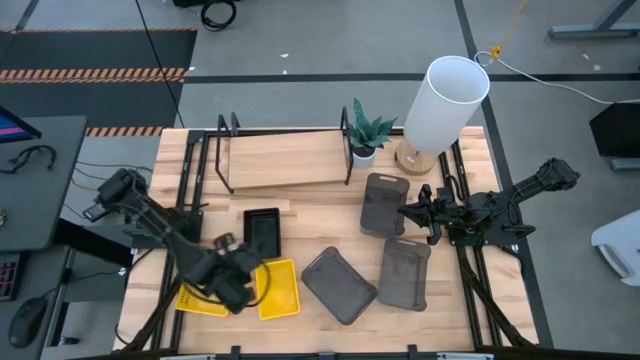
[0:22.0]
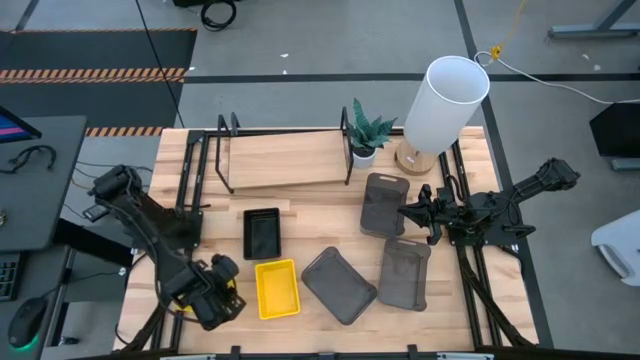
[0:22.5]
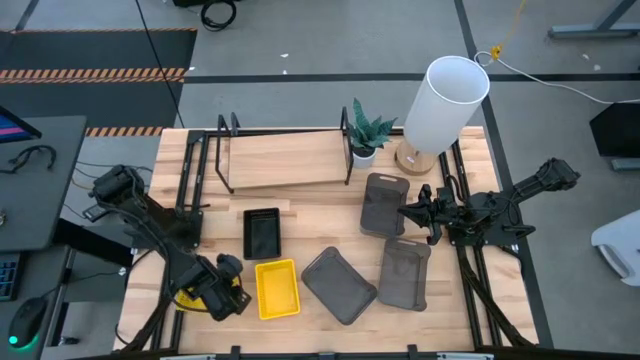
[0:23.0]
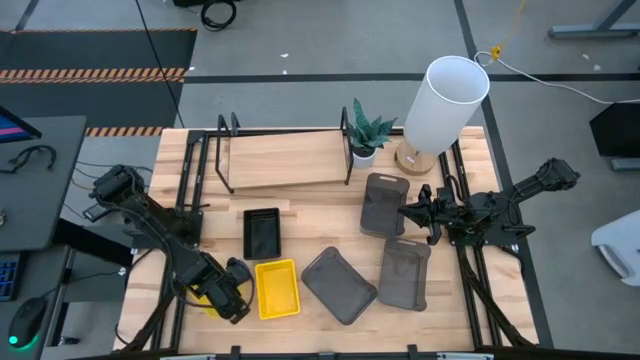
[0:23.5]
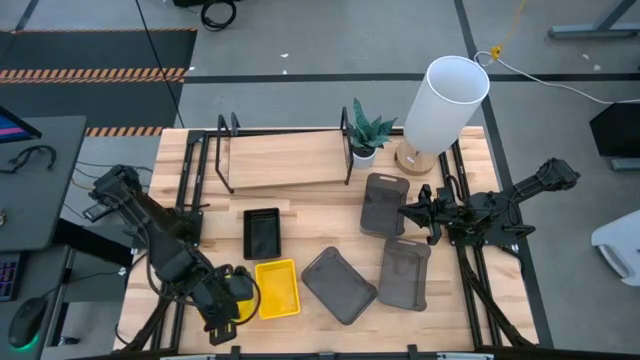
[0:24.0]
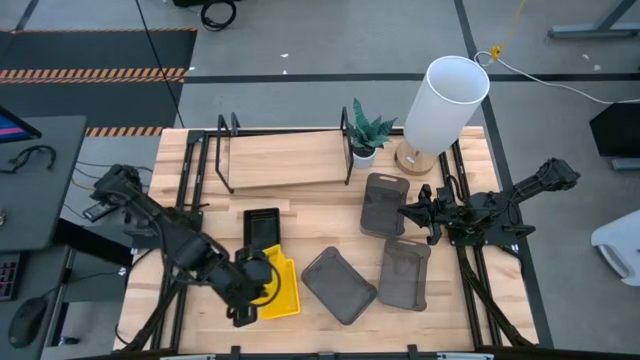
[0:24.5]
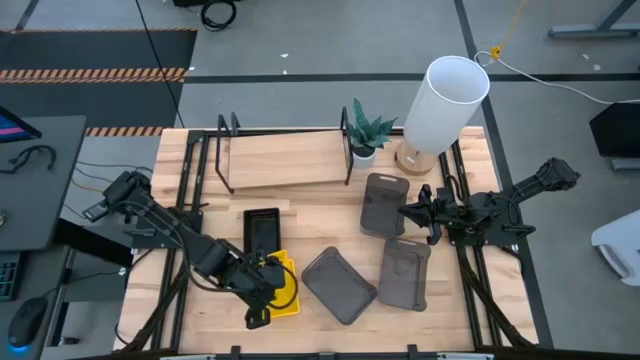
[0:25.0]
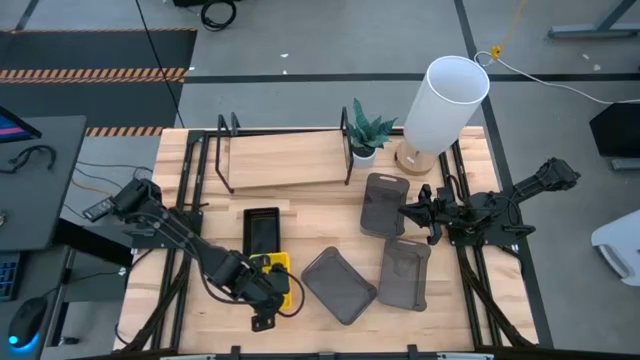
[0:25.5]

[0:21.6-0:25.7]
Task: Stack baskets on shelf by color
Stack the left yellow bin on top of the right yellow bin

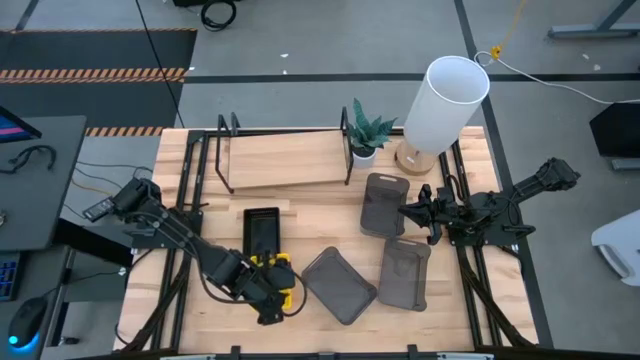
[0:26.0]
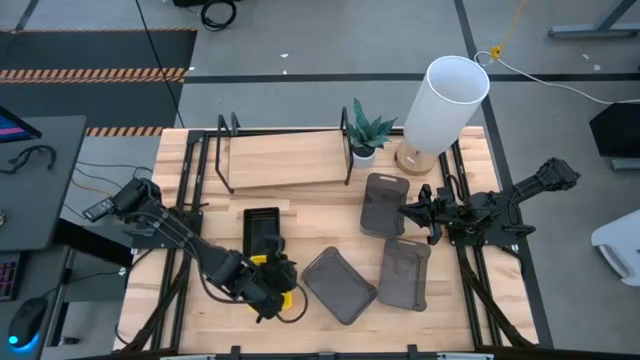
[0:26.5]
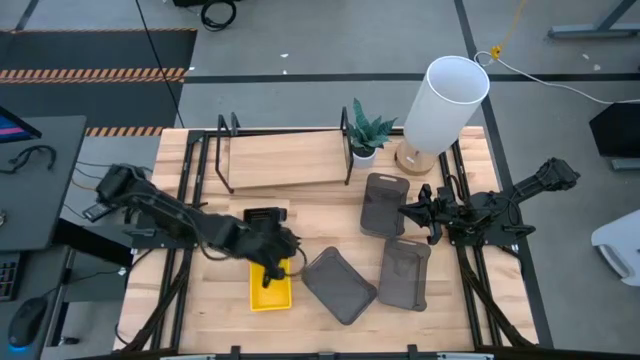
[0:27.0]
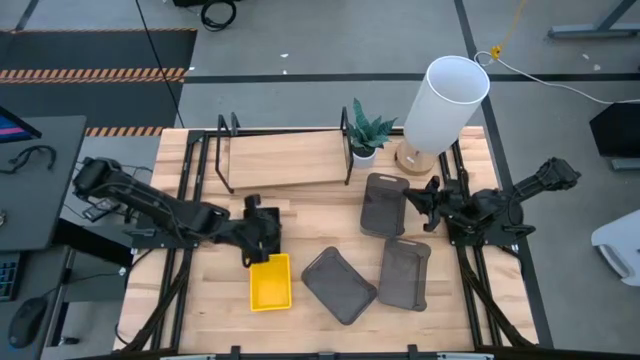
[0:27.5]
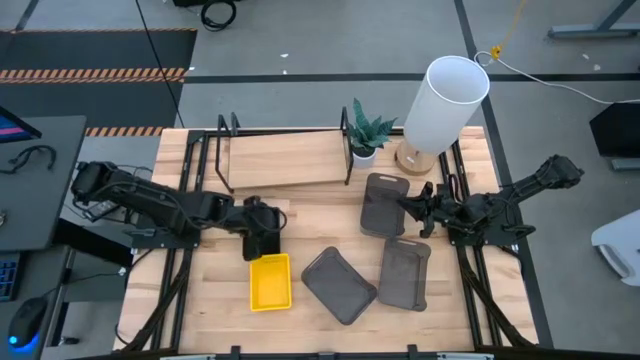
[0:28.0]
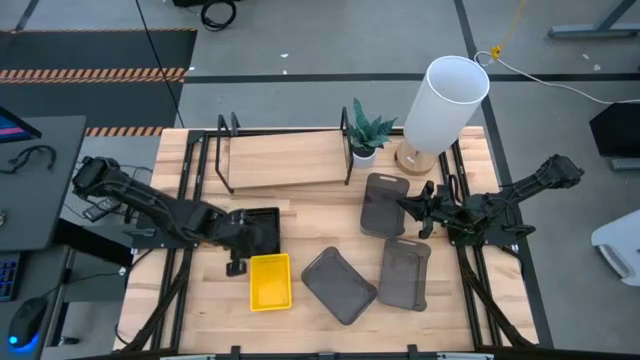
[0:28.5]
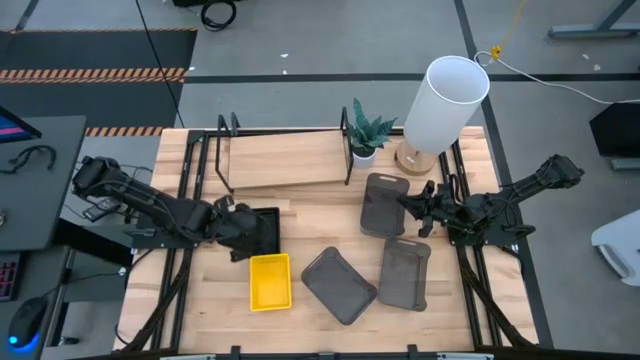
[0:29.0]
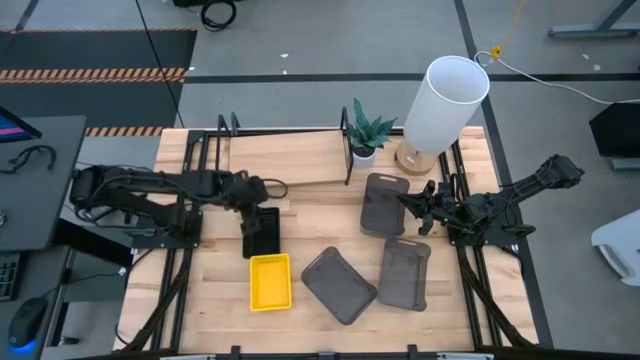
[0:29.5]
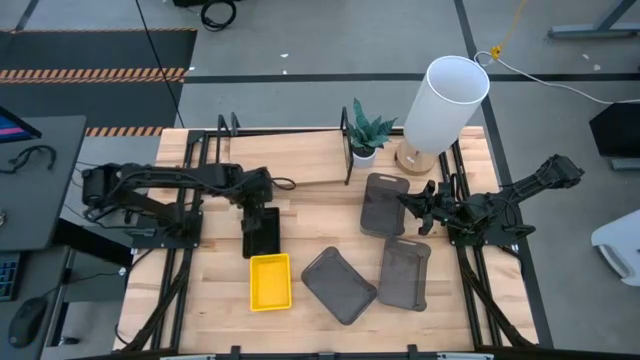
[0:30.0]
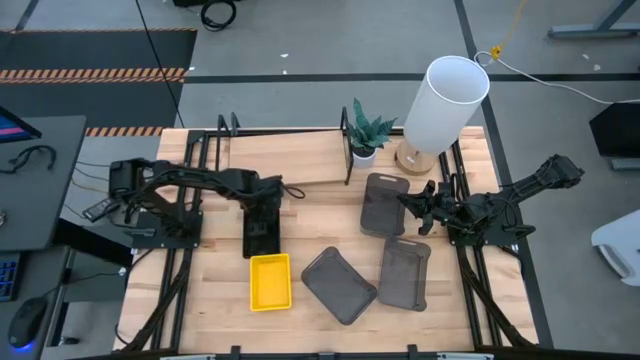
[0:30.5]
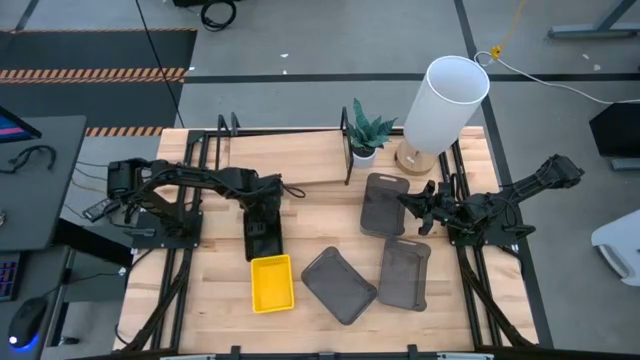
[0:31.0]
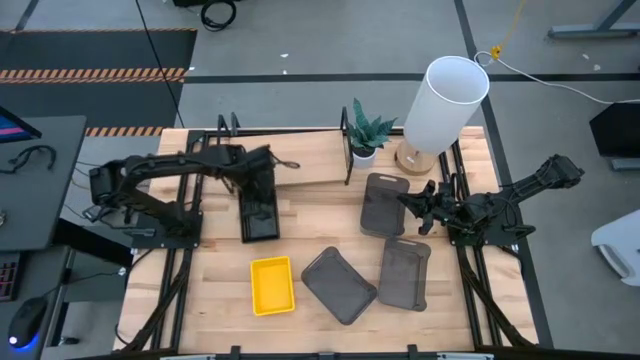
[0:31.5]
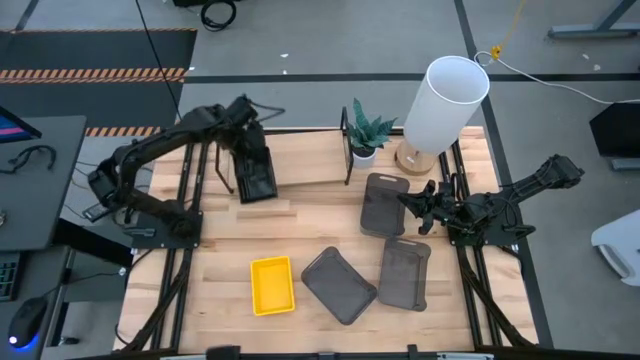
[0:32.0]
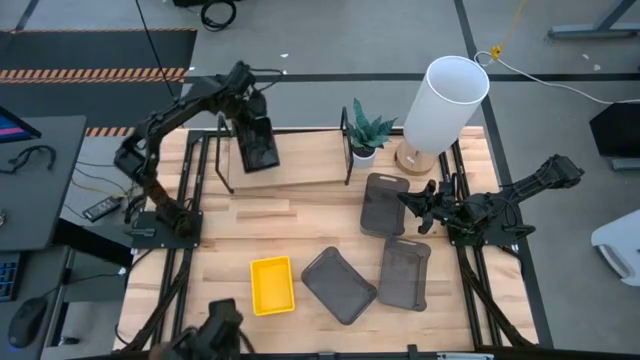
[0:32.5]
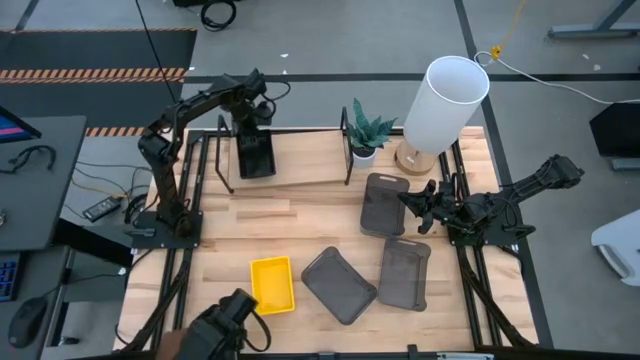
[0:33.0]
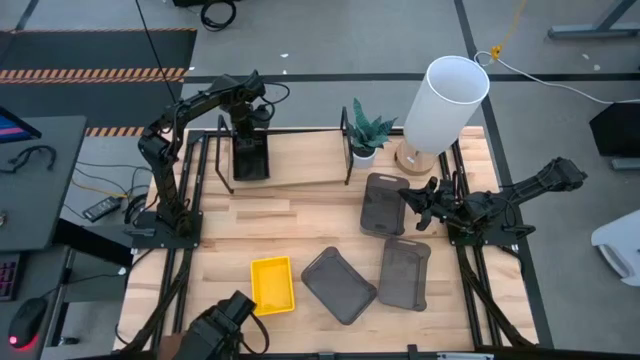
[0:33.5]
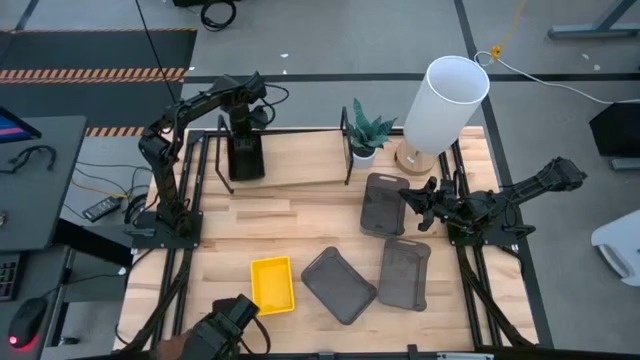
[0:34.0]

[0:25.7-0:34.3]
Put the stacked black bins on the shelf

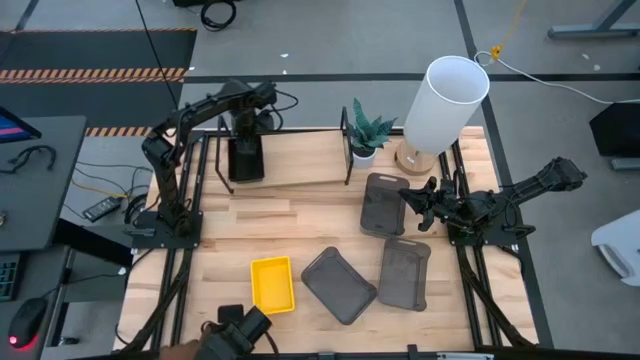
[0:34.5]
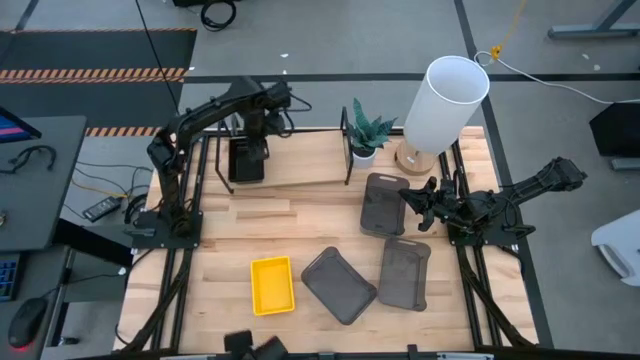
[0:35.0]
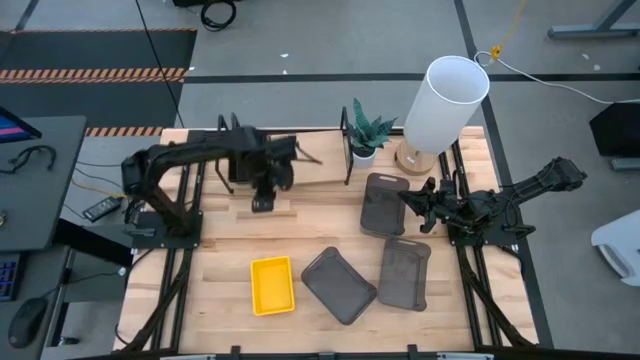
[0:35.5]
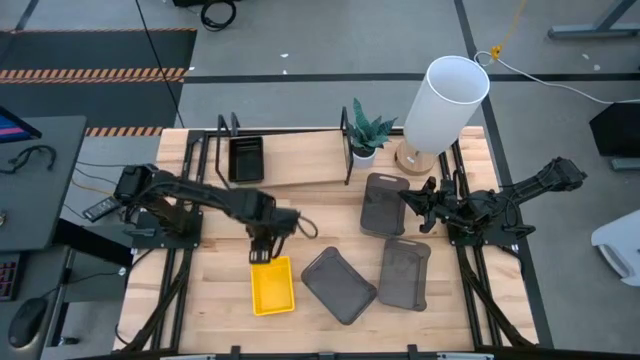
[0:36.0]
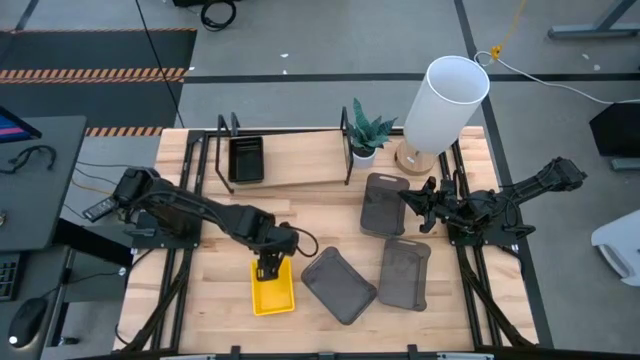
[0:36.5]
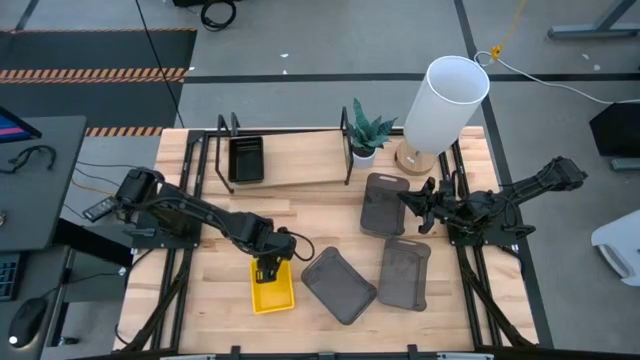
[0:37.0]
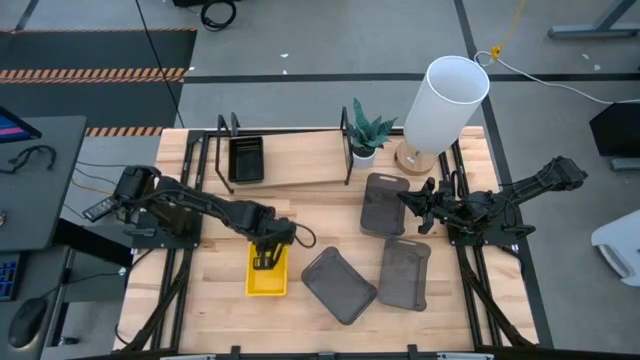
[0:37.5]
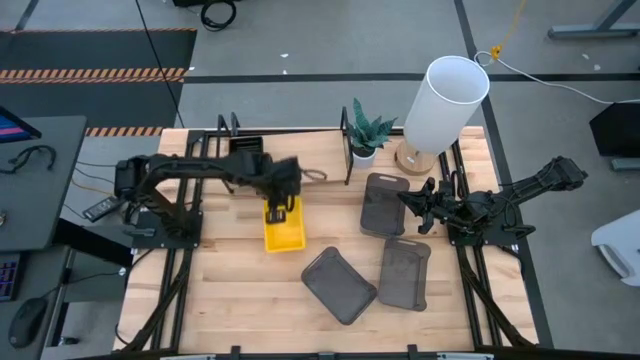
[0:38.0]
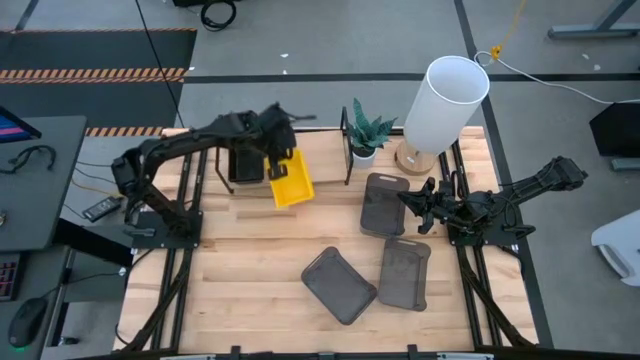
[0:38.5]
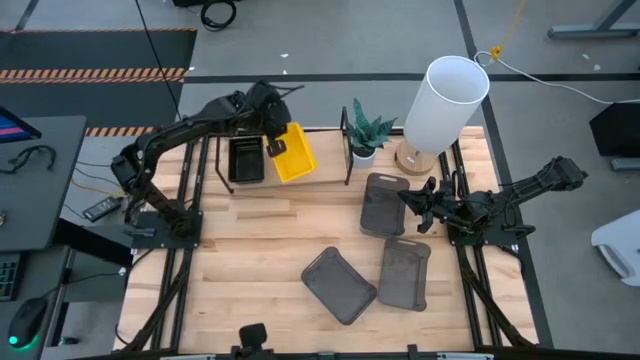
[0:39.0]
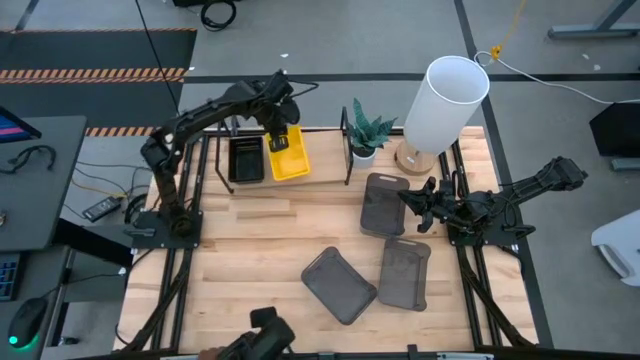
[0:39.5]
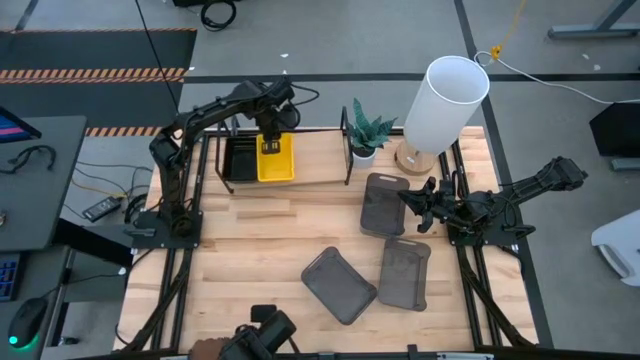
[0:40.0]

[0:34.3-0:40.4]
Put the stacked yellow bins on the shelf aligned with the other stacked bins

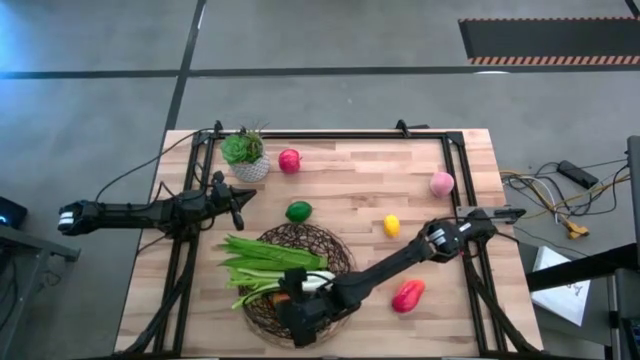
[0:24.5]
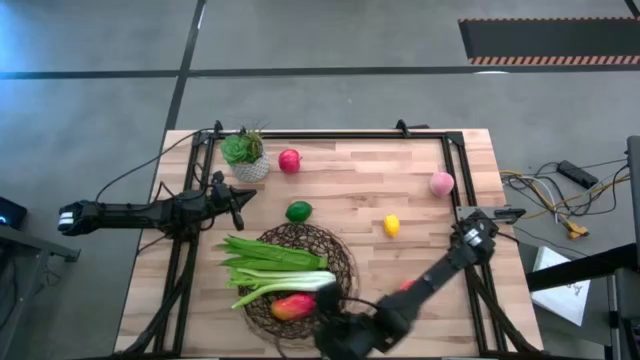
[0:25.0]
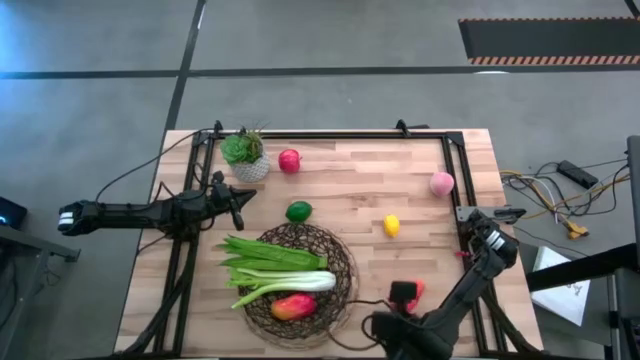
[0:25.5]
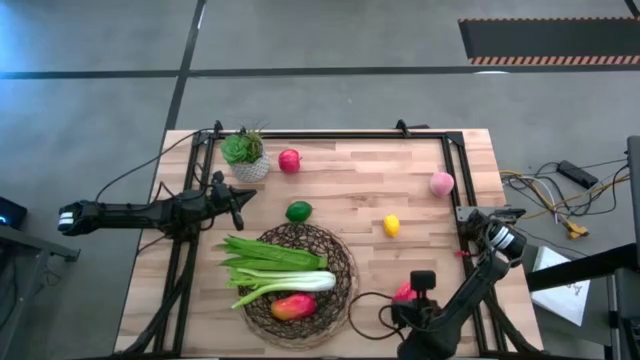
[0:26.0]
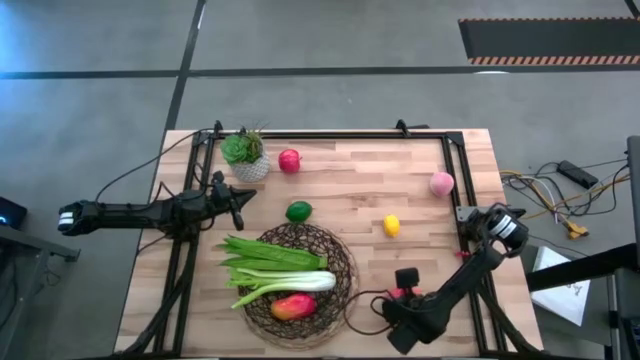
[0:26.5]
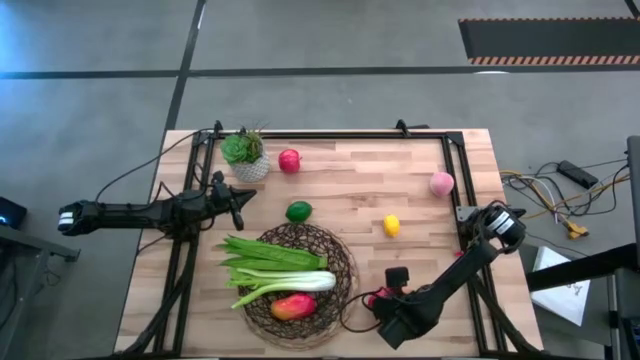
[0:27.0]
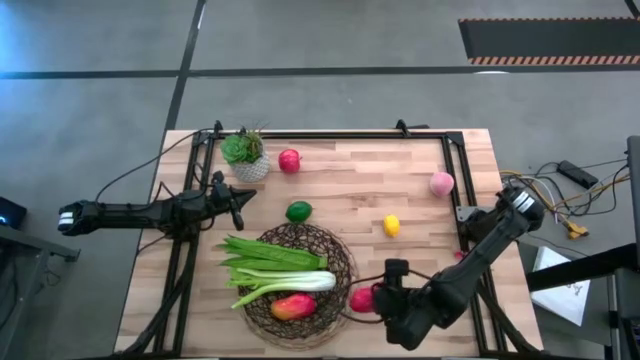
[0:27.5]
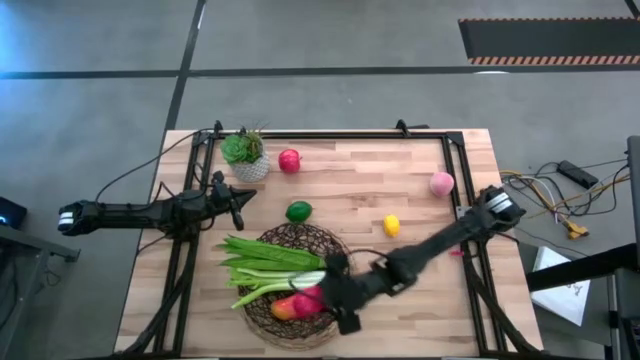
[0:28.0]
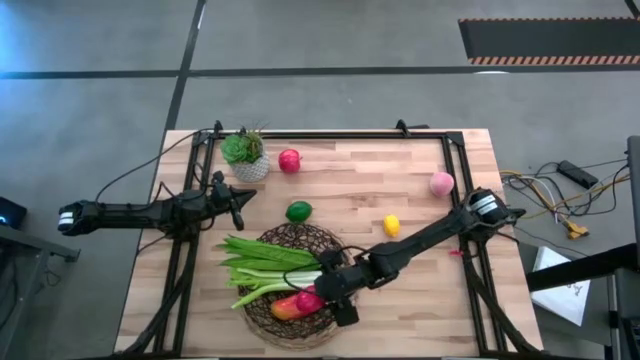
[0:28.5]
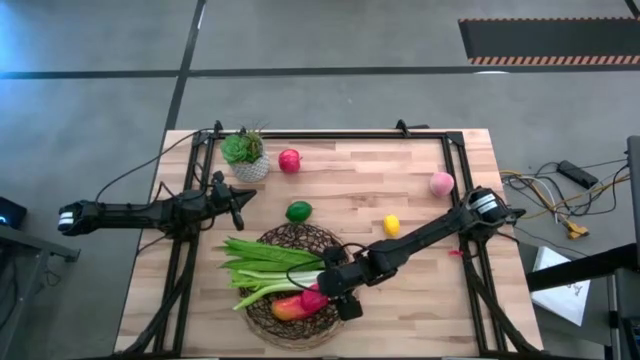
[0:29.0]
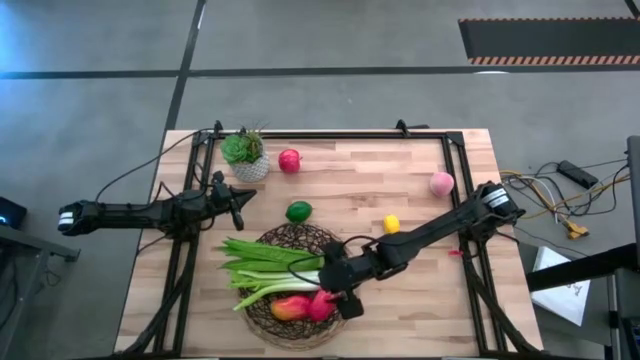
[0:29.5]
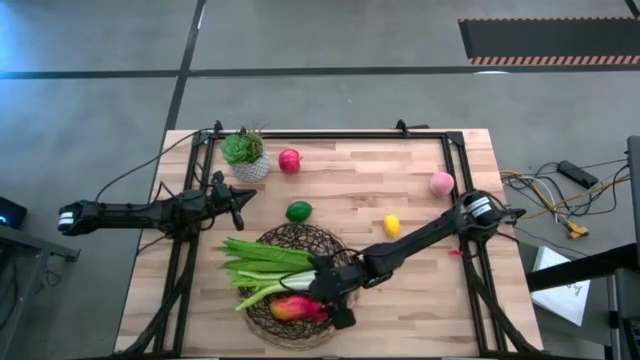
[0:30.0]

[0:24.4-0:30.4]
Task: Build produce basket
Put the mango into the mesh basket
